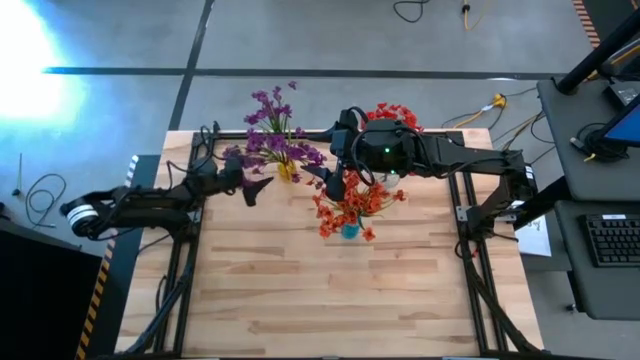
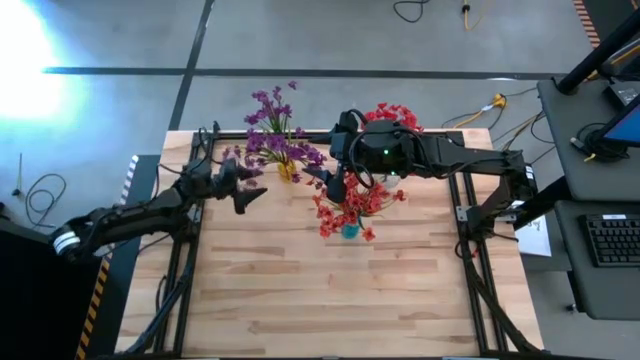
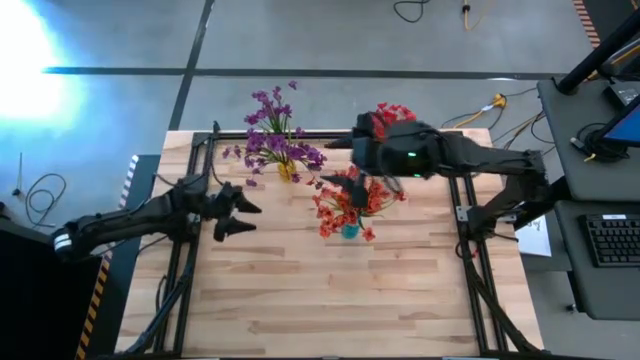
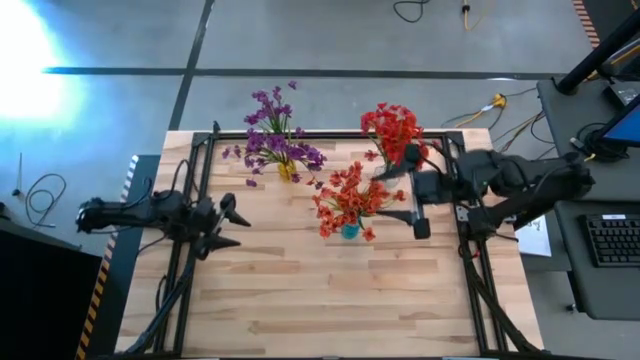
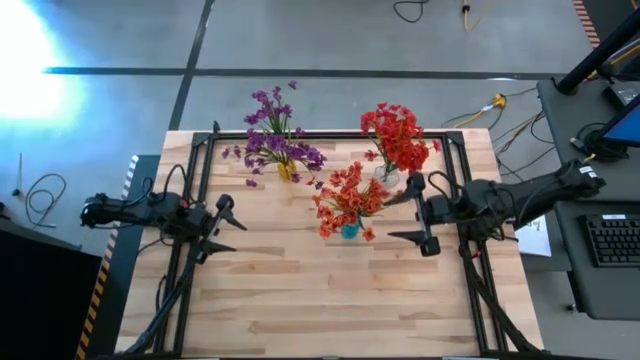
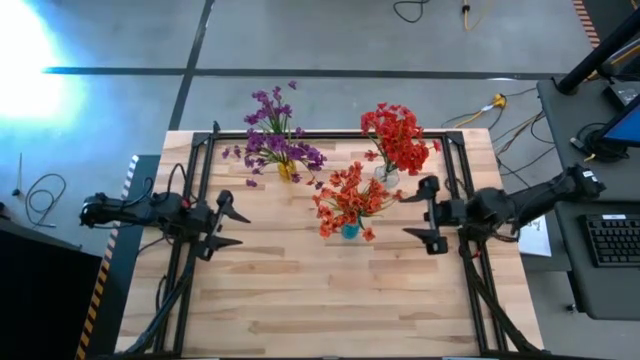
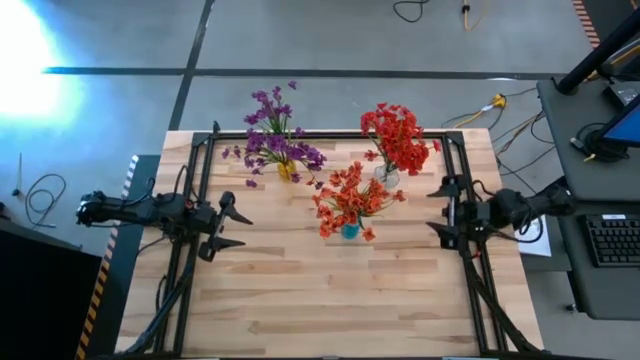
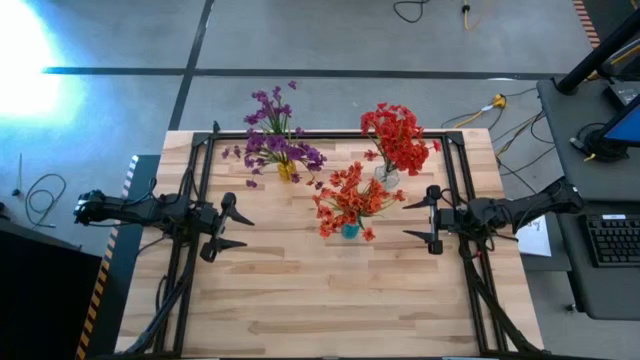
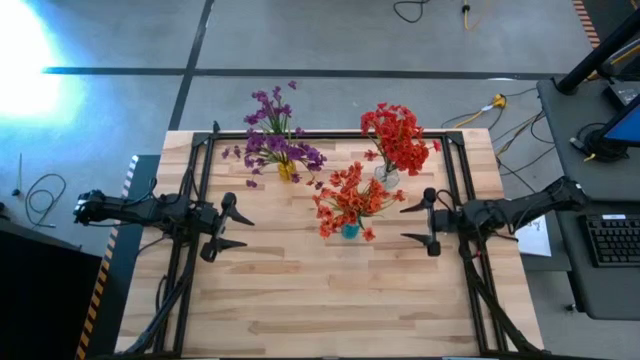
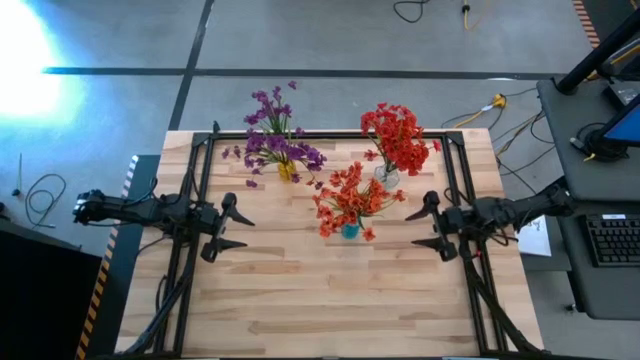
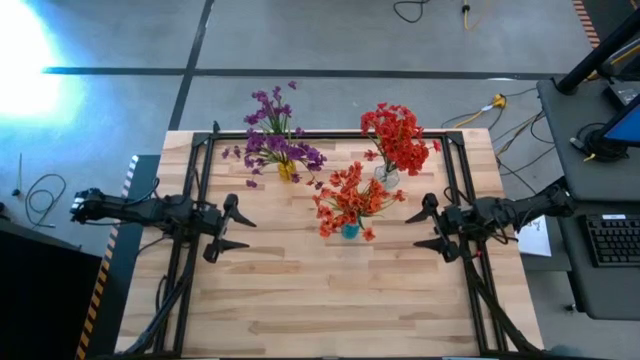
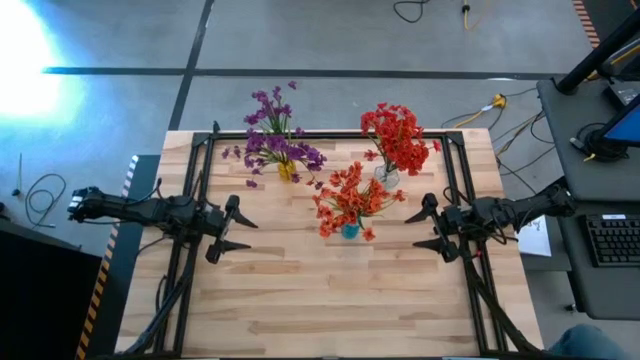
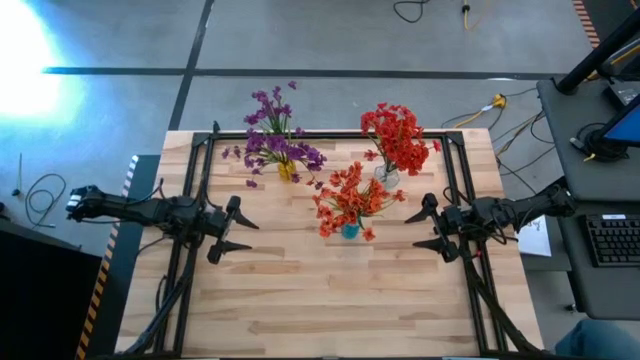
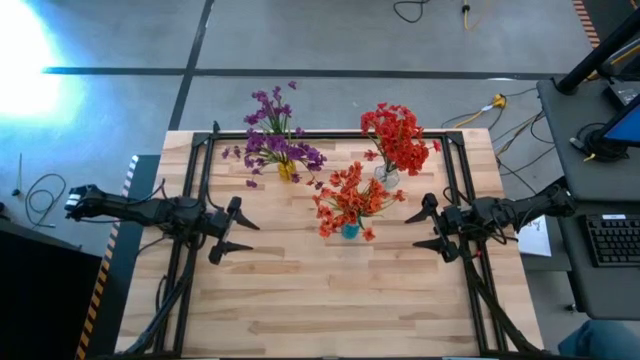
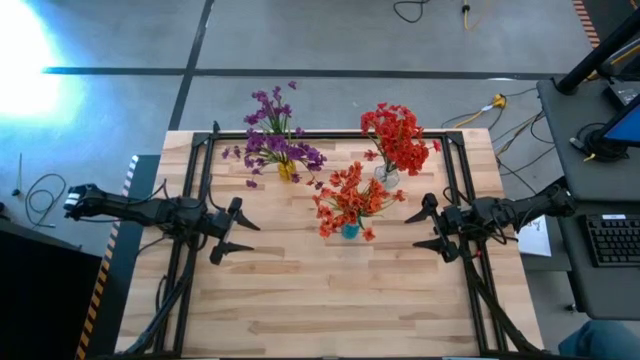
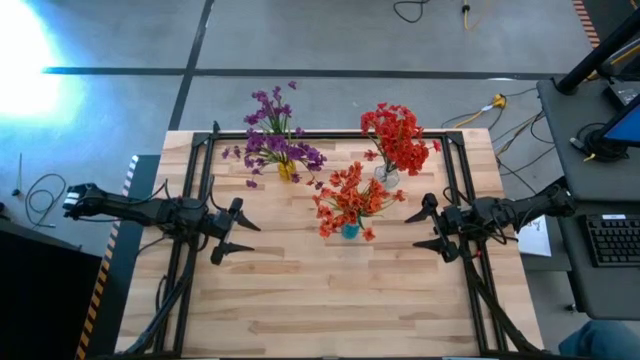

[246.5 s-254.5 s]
Task: Sort flowers into vase by color
Return to Home Position

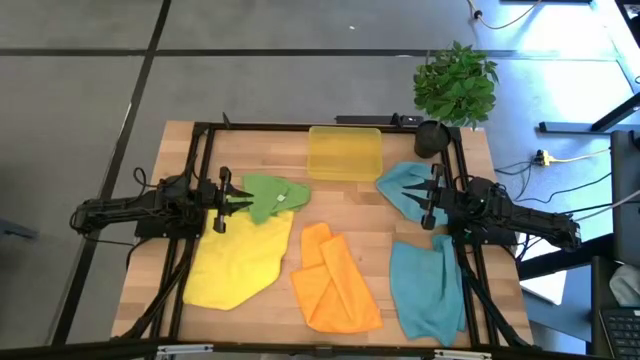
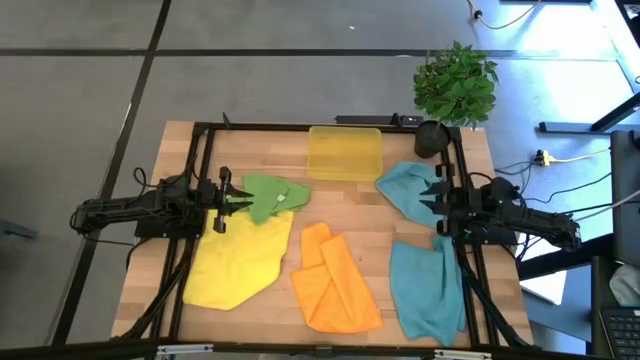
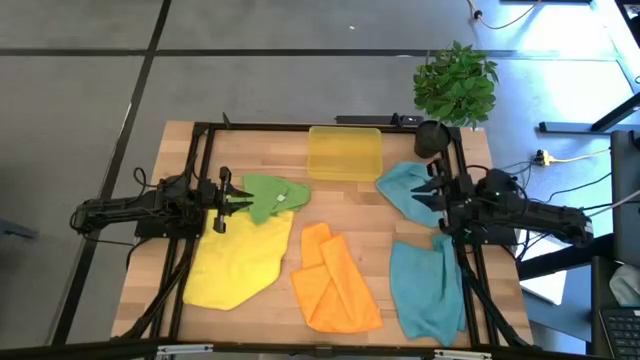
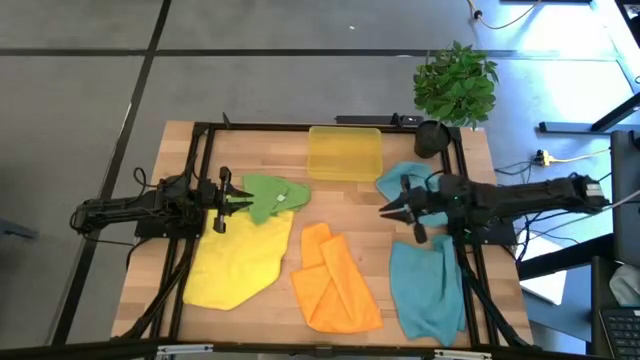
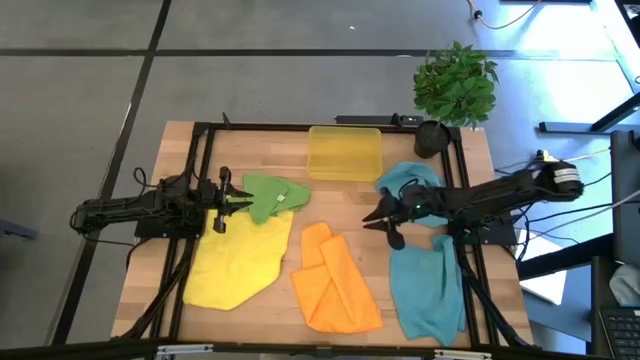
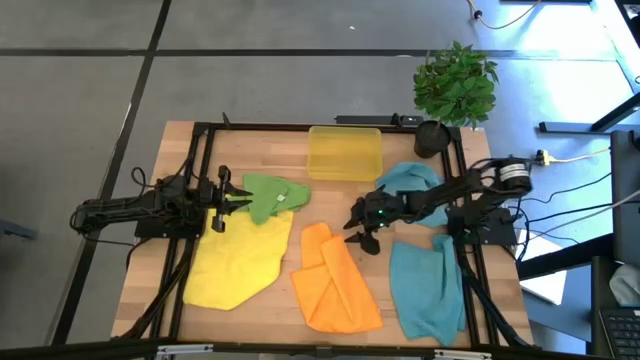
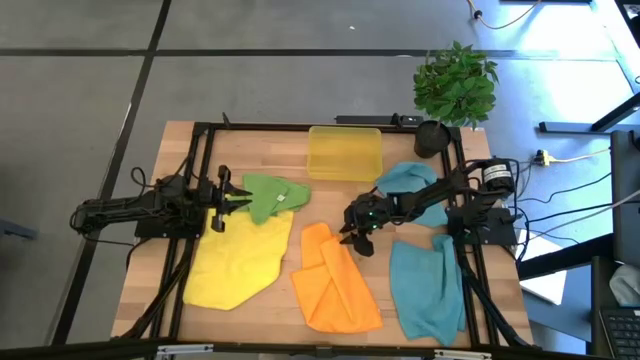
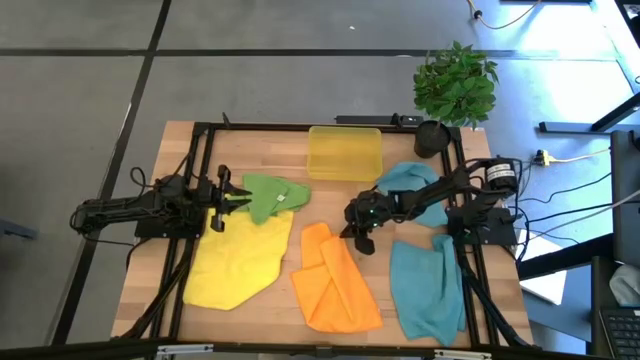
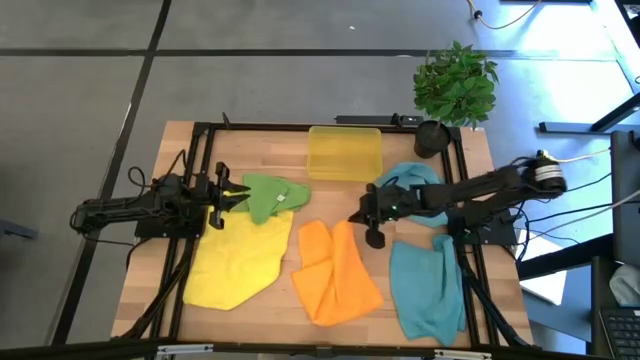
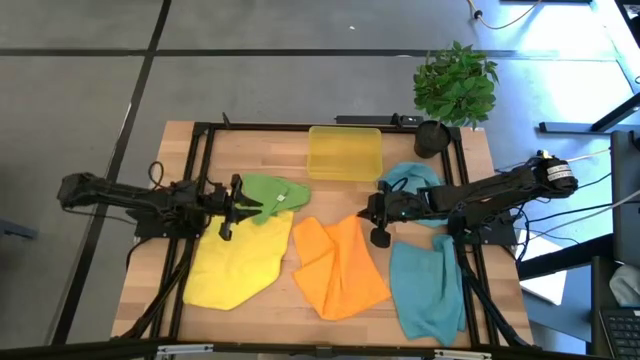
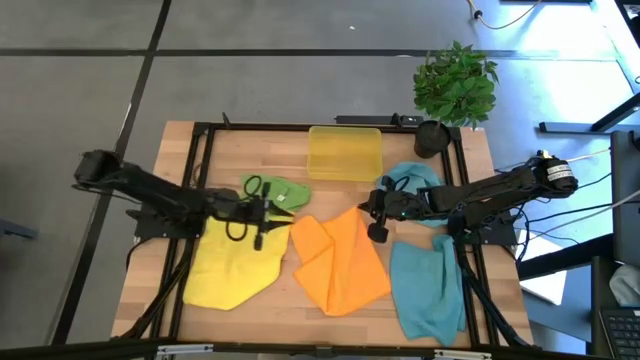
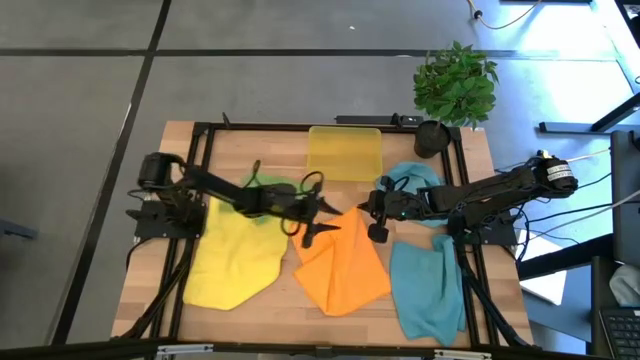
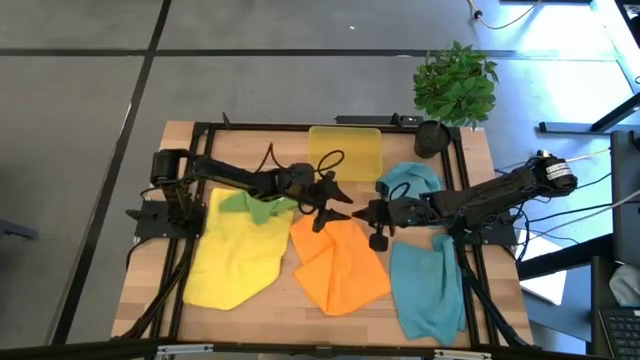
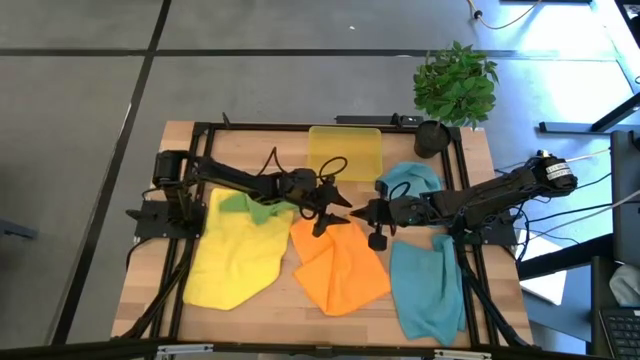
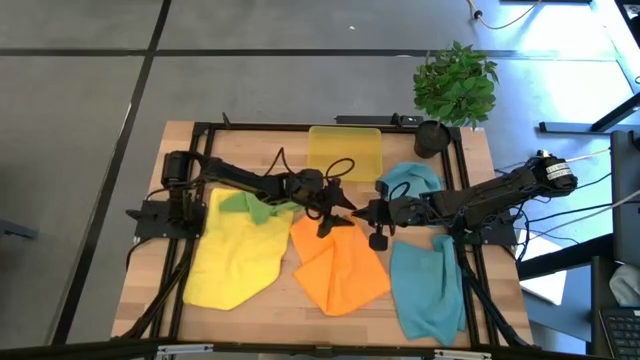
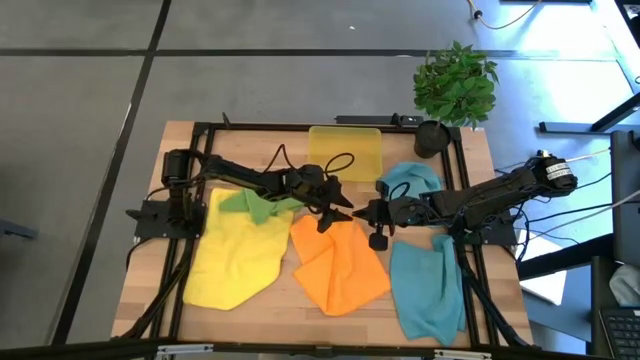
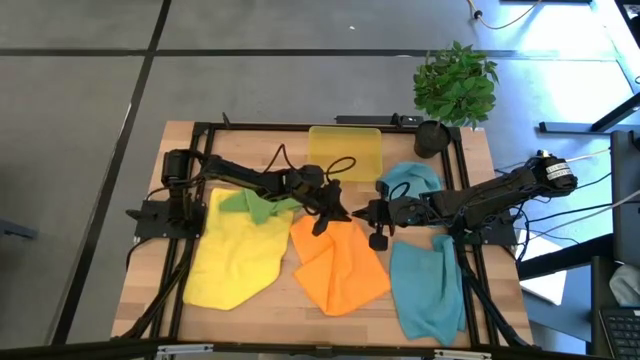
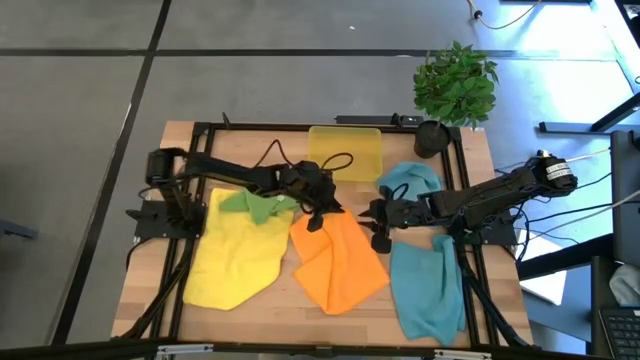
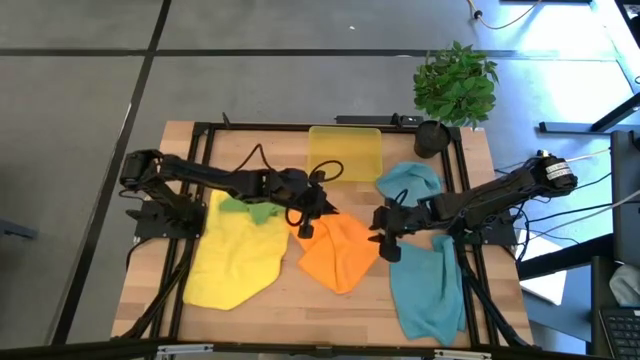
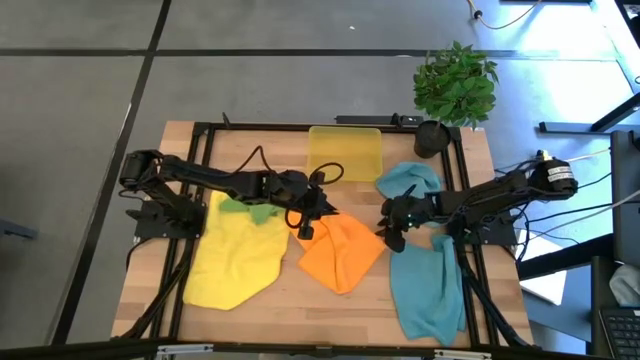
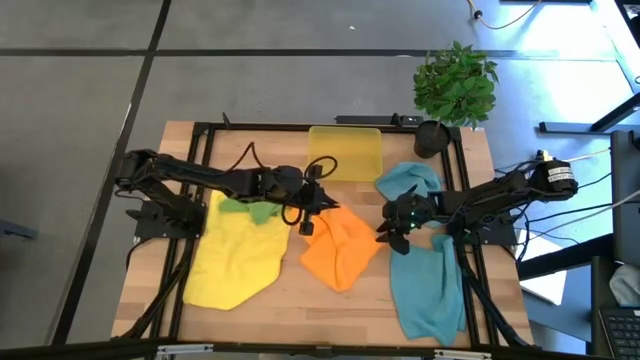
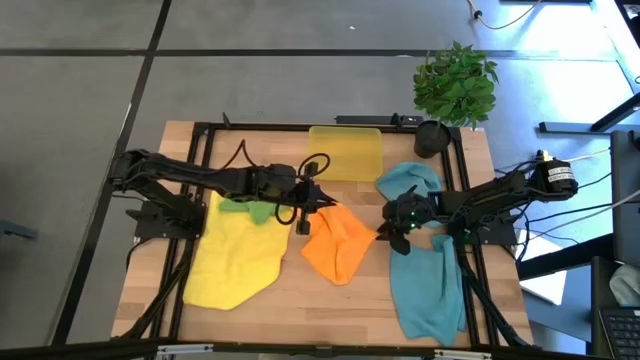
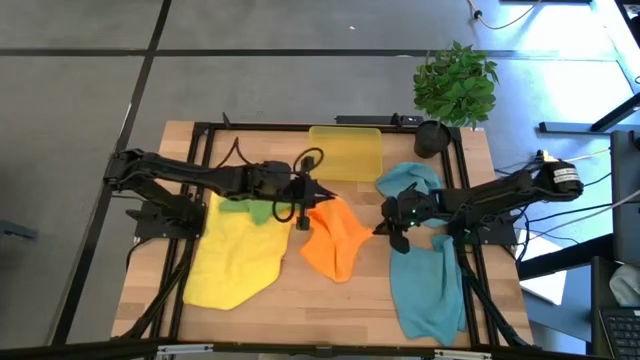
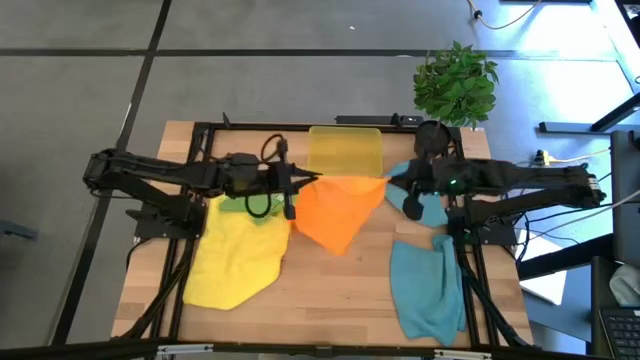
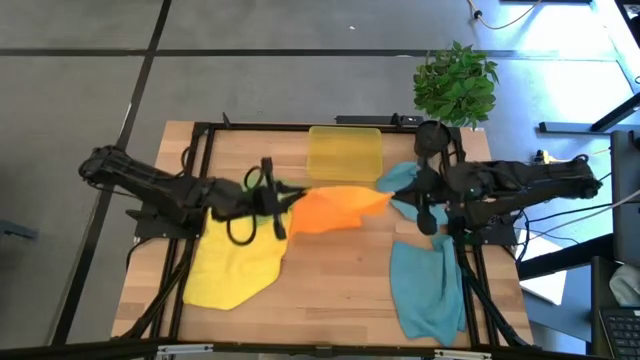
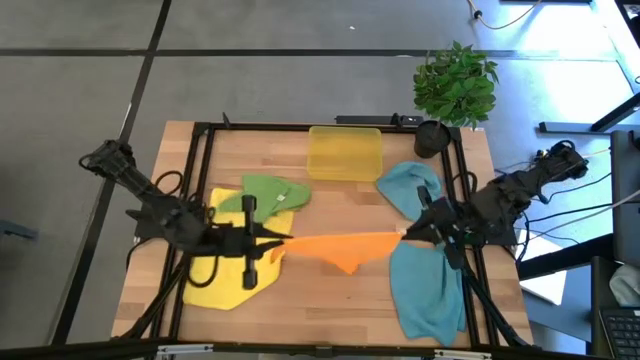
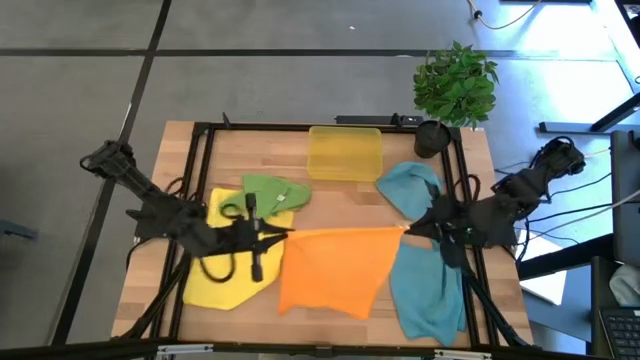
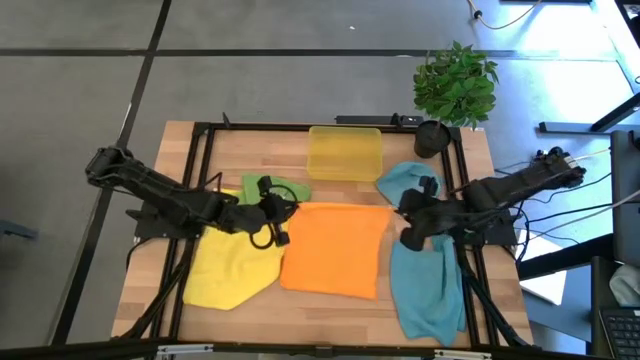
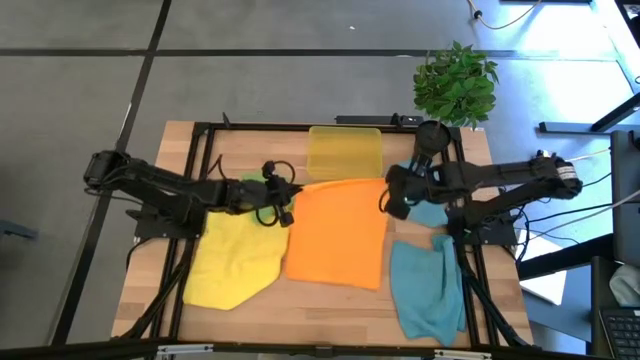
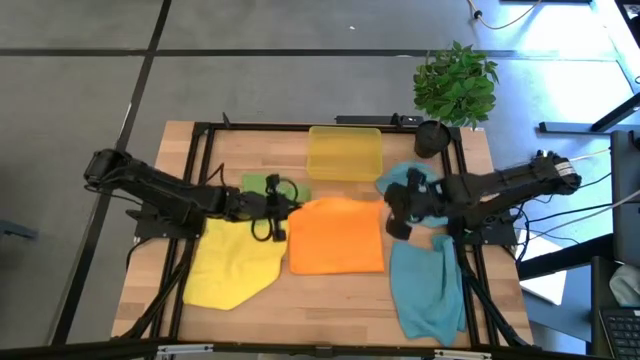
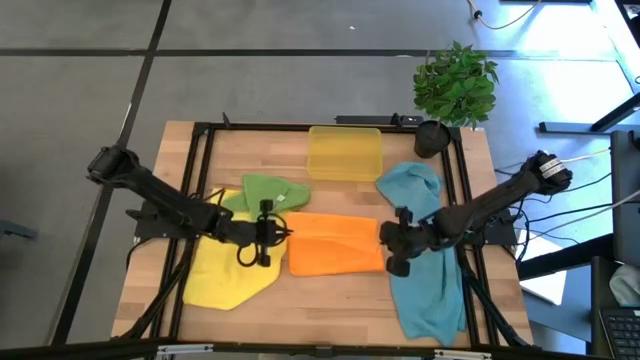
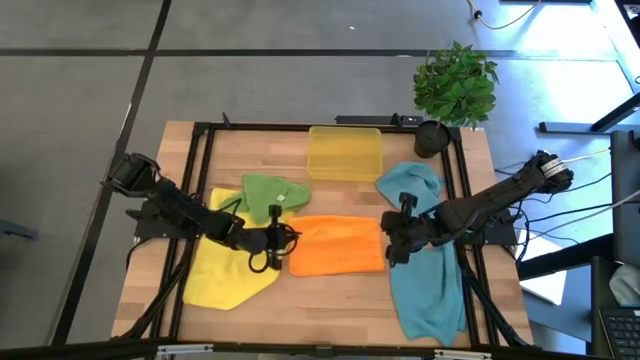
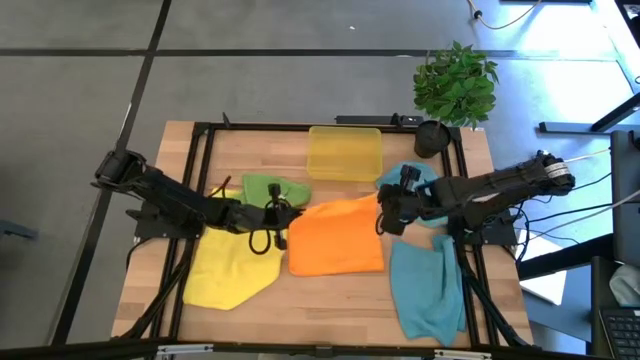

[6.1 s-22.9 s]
Task: Fold microfiber towels
Fold the orange microfiber cloth
